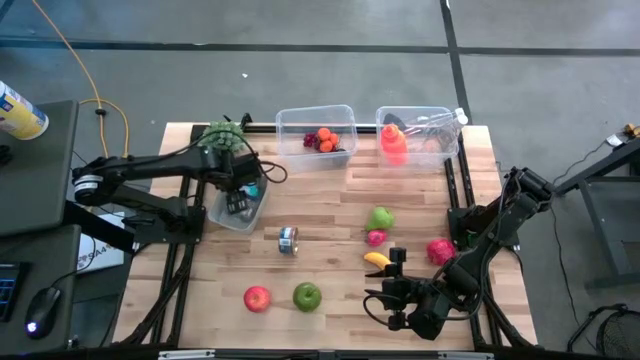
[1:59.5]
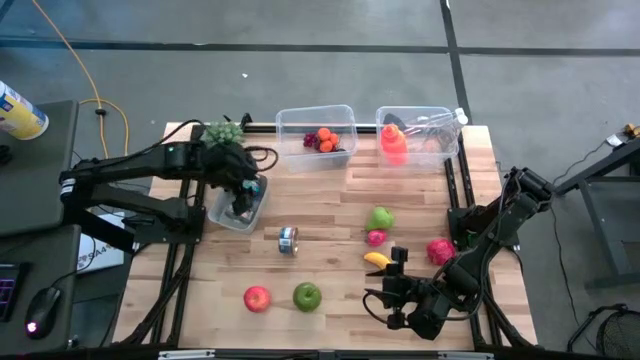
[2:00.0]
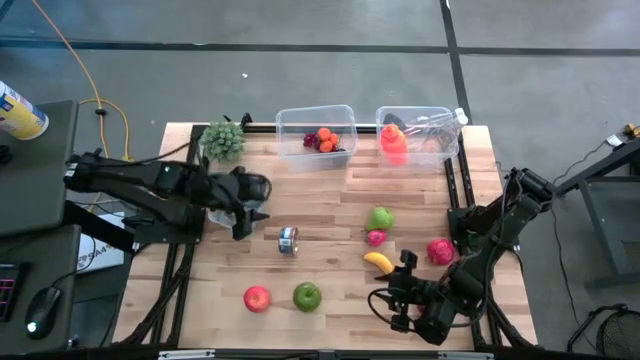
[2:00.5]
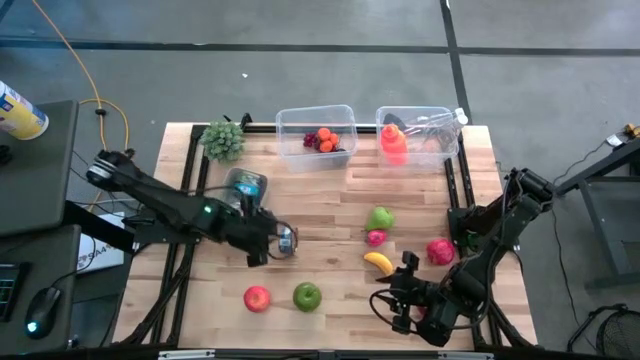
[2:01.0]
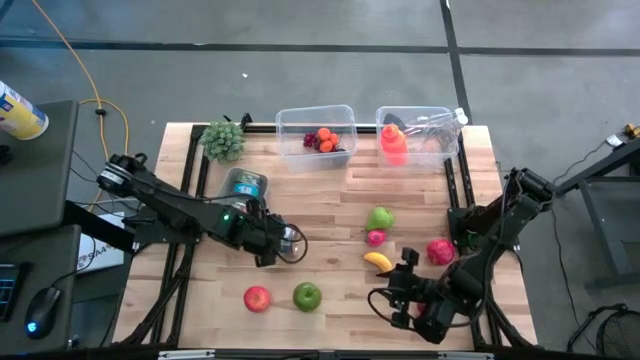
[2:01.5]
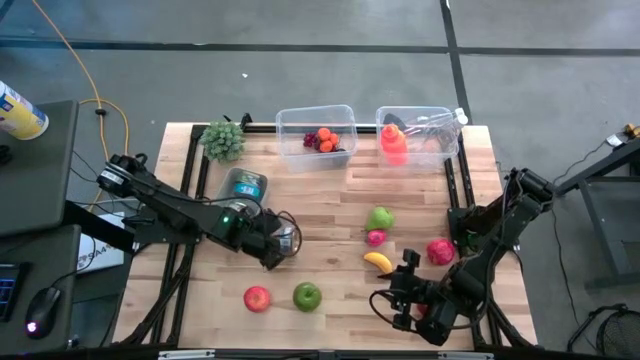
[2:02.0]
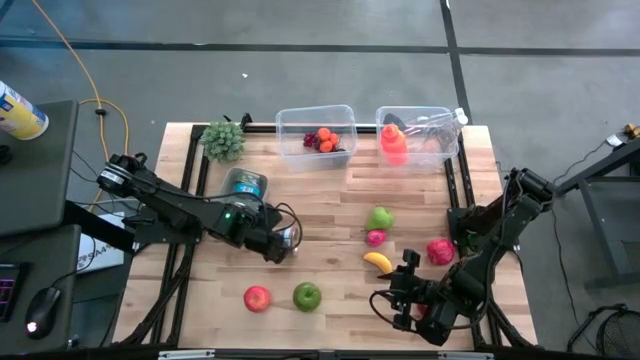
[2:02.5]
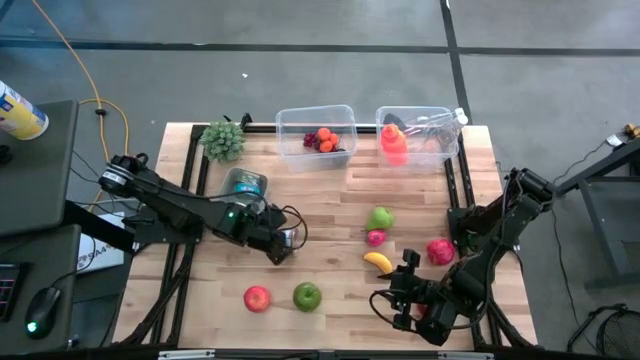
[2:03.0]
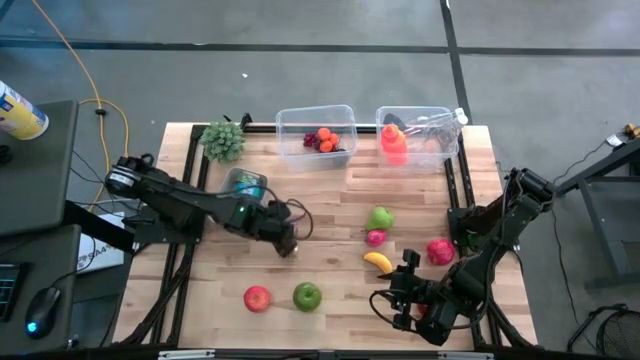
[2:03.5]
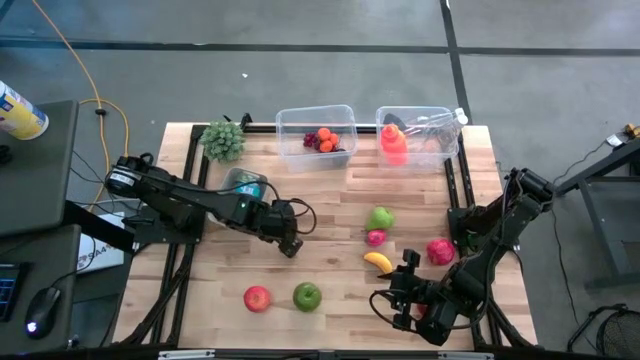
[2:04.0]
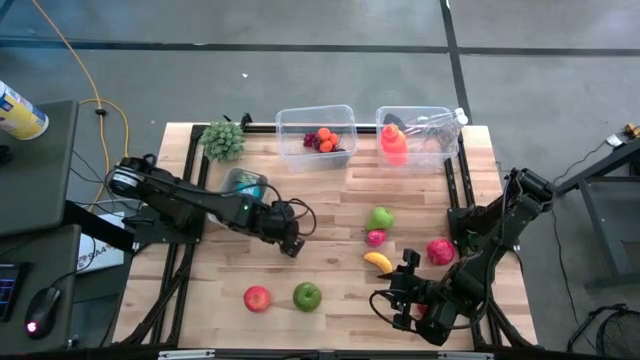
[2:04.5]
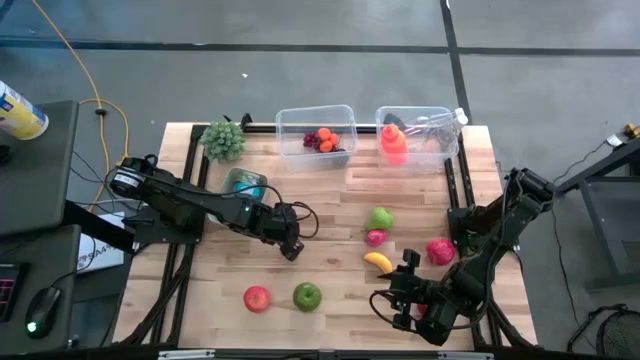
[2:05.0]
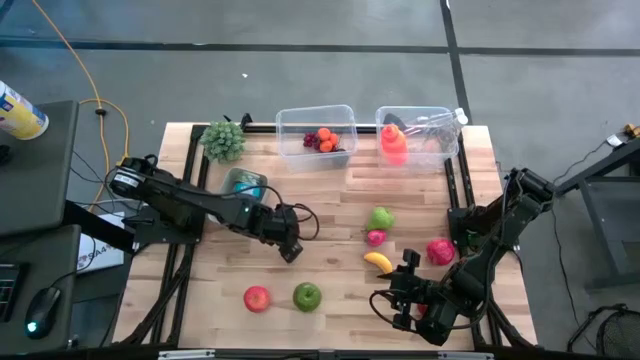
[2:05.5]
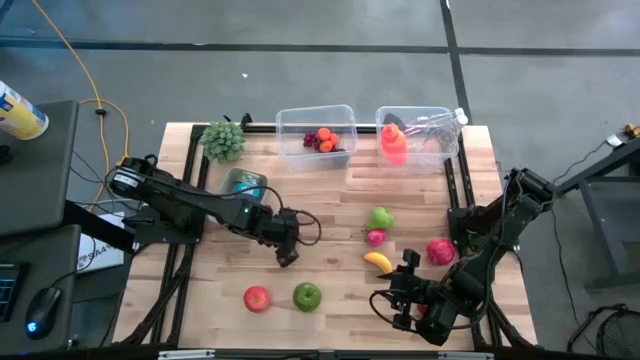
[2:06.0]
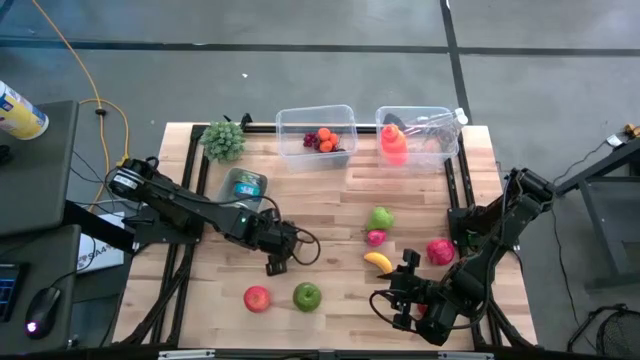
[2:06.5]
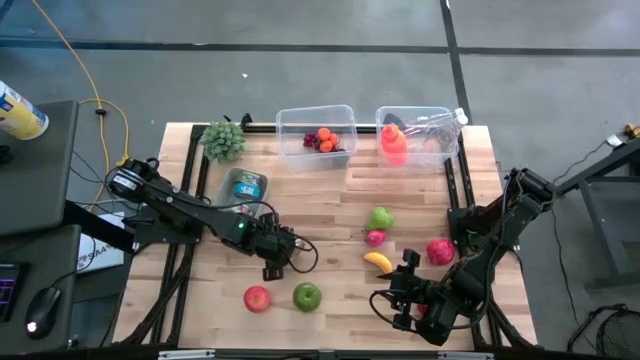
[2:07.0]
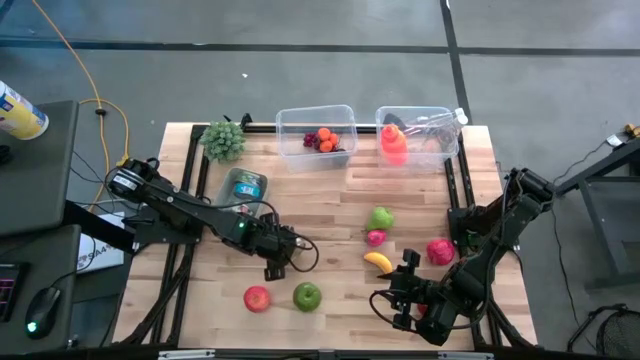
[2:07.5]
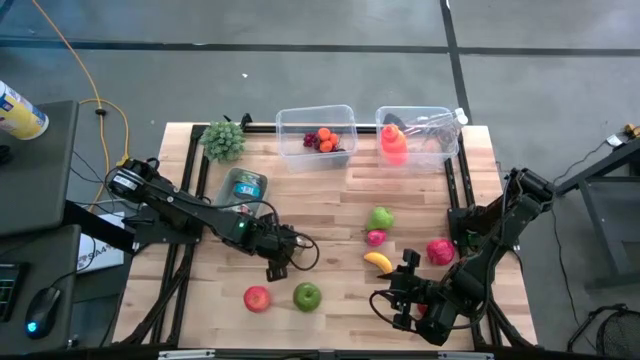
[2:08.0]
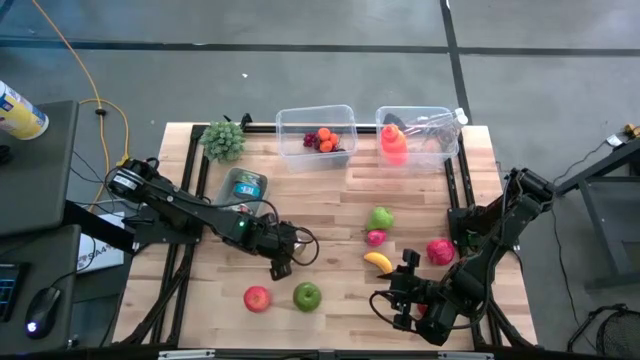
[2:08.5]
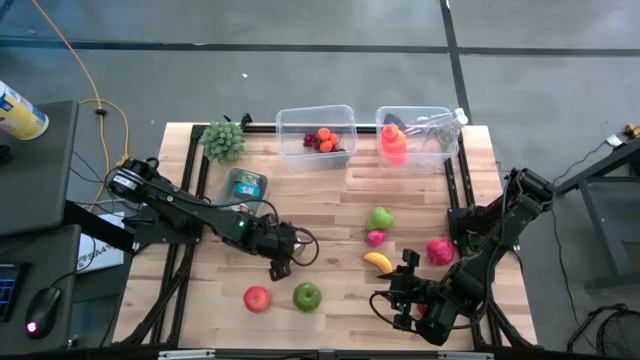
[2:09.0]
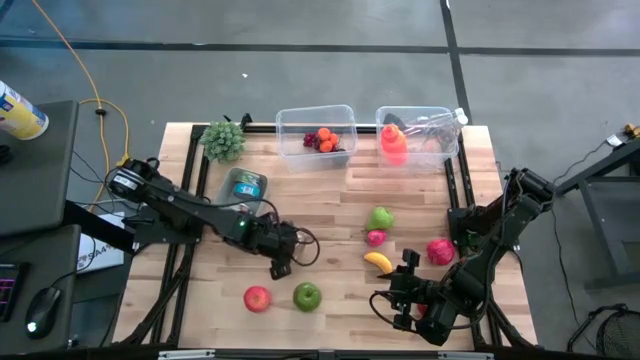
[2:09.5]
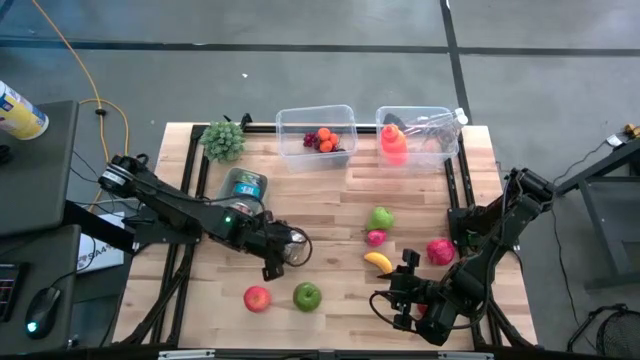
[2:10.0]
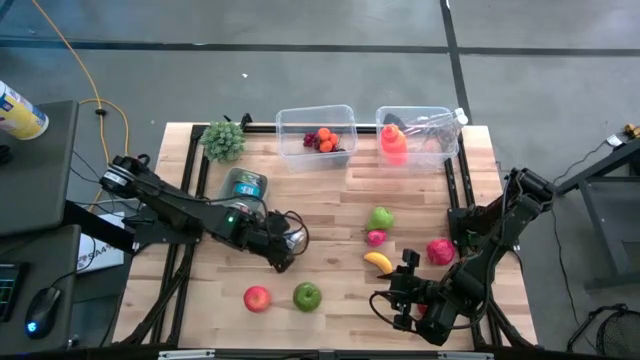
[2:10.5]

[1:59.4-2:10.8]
Task: Pick & Place Food Item
Put the blue pink tuna can into the grey bin

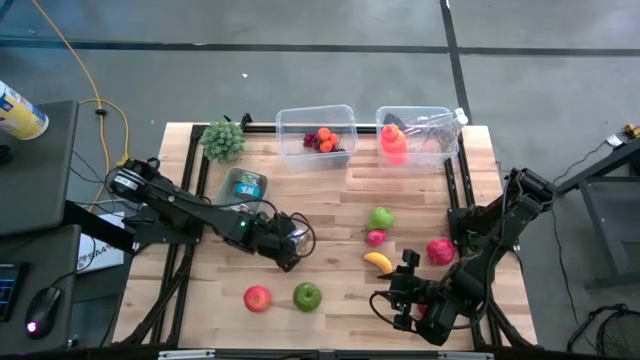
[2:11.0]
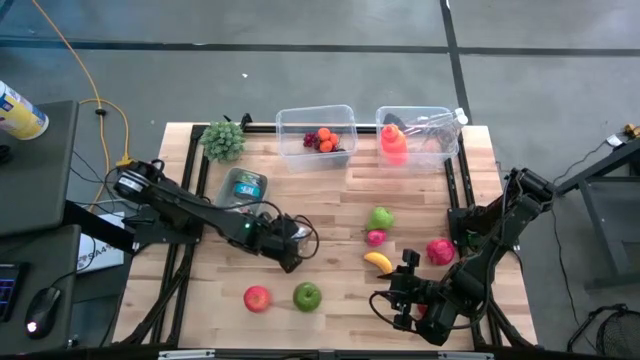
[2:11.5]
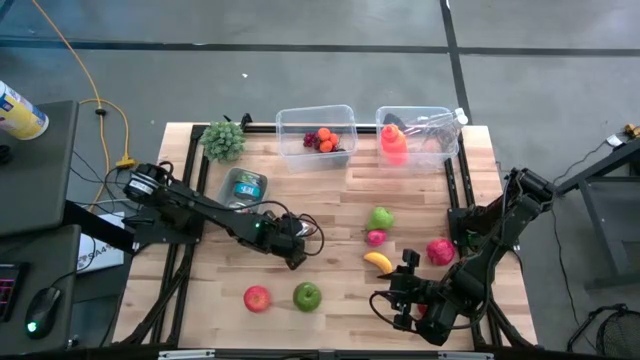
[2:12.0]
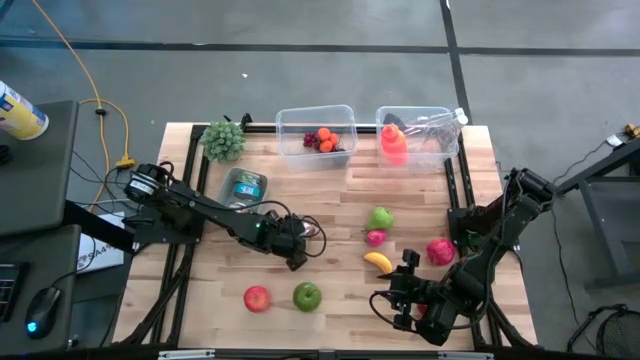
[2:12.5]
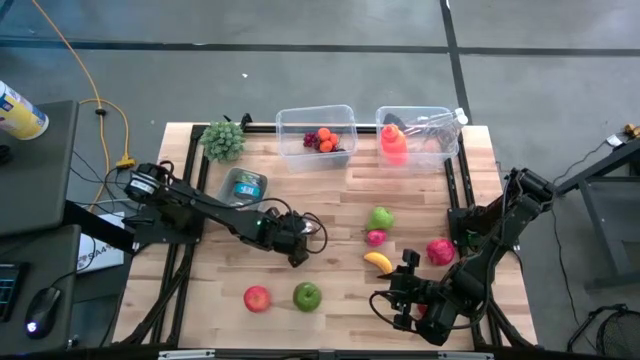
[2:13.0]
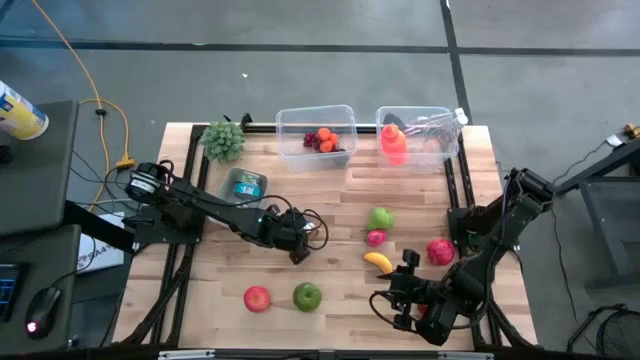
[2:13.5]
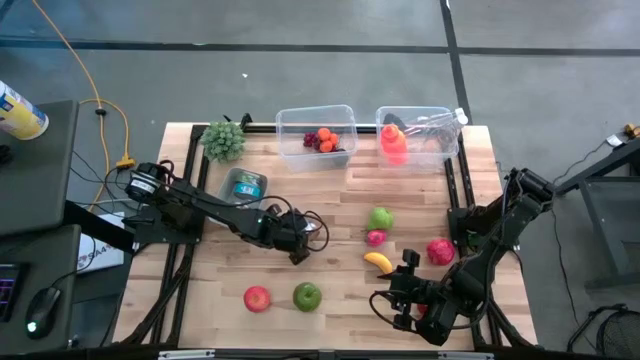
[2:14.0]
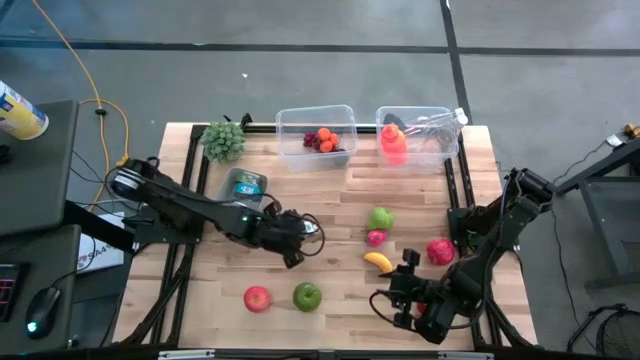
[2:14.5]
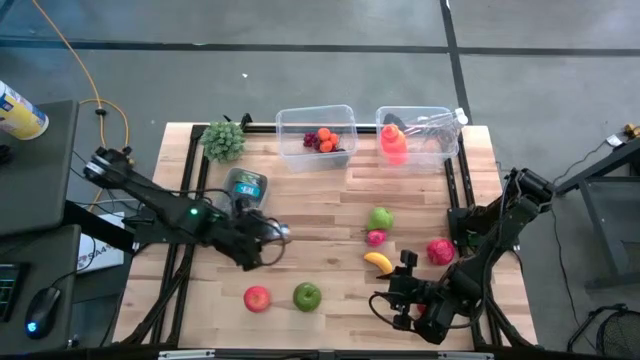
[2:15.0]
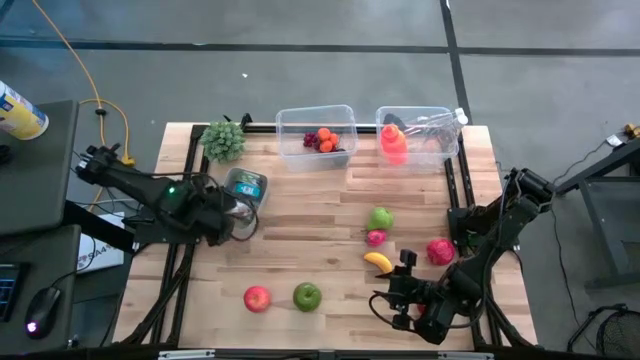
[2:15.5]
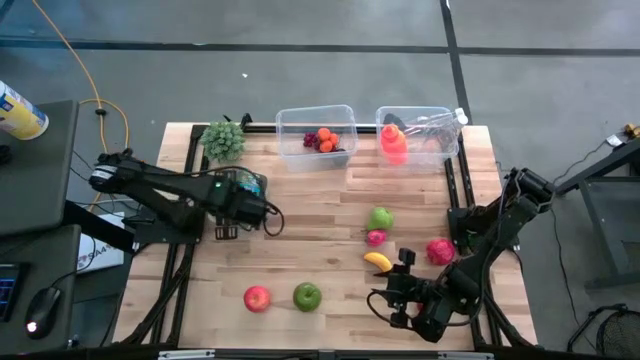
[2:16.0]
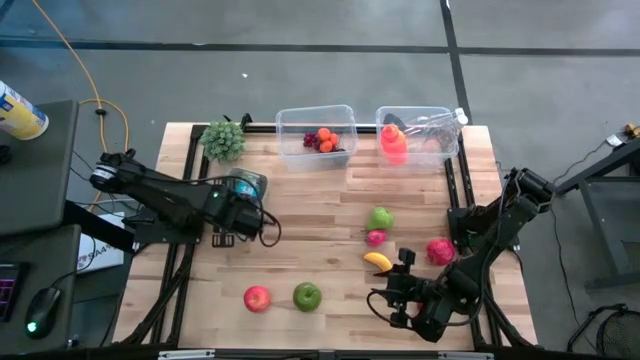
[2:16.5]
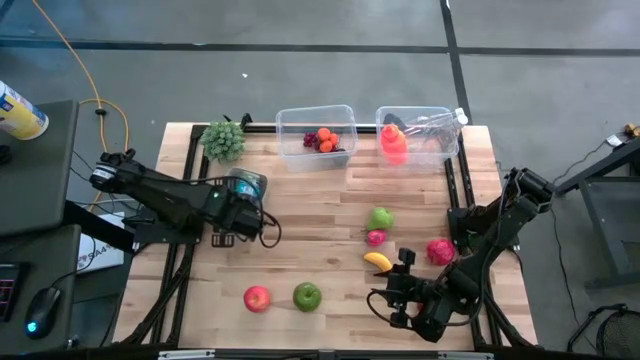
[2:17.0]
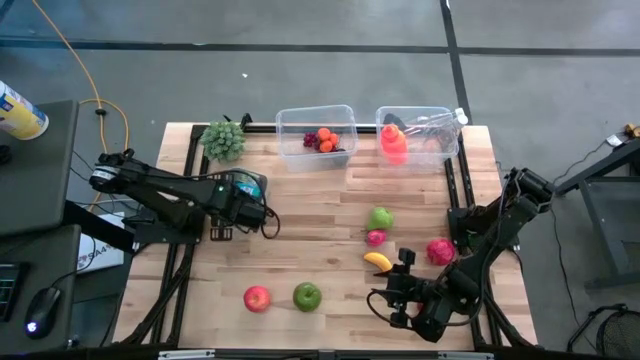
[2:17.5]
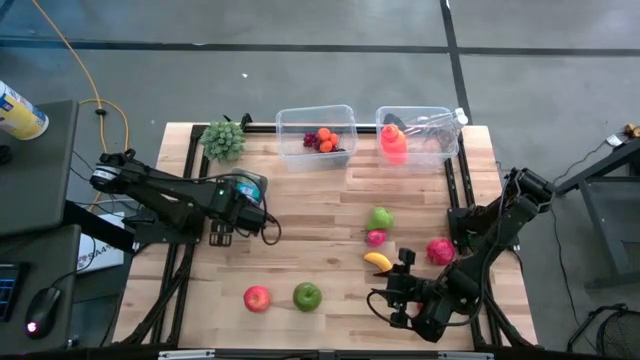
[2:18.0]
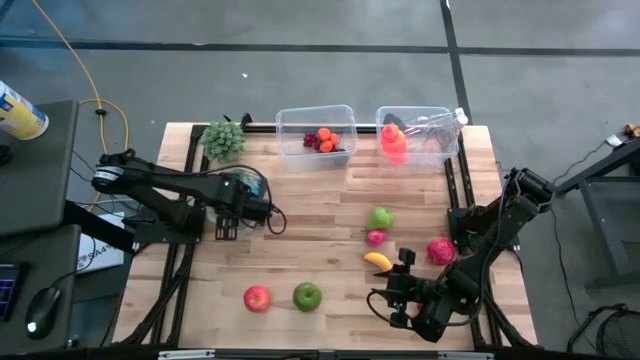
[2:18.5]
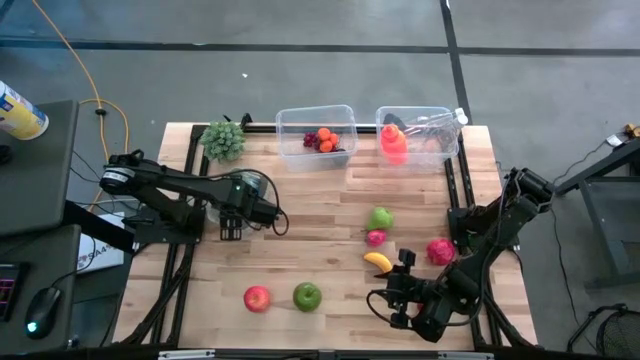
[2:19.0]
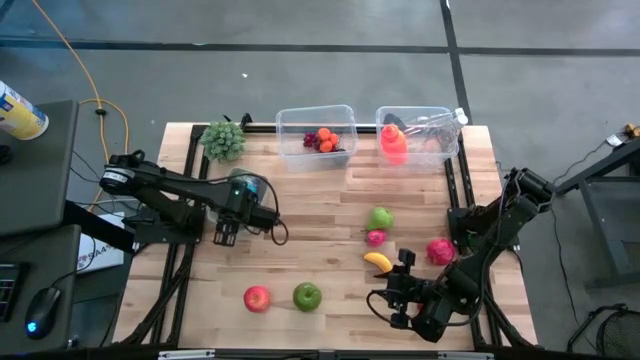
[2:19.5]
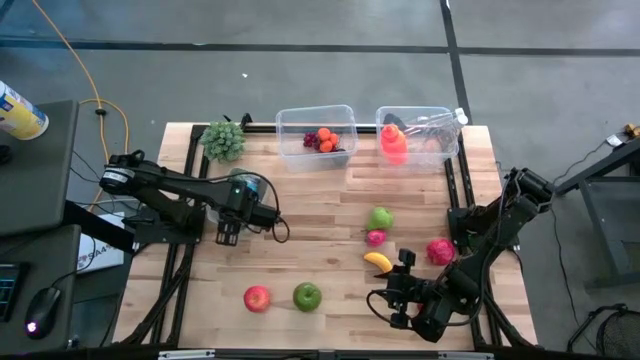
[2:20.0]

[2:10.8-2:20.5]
Put the blue pink tuna can into the grey bin

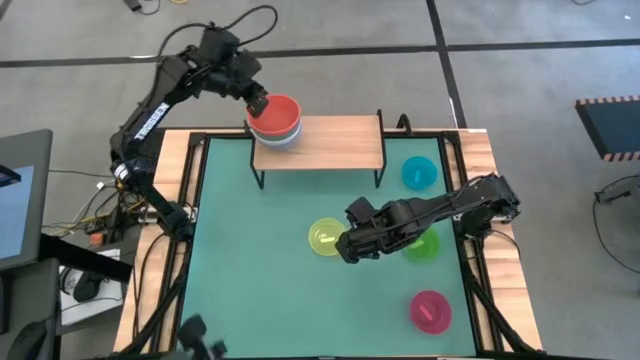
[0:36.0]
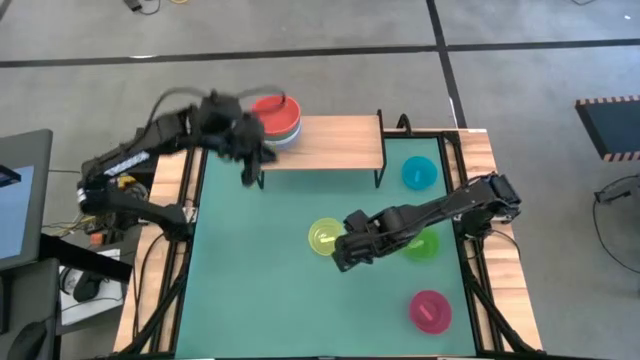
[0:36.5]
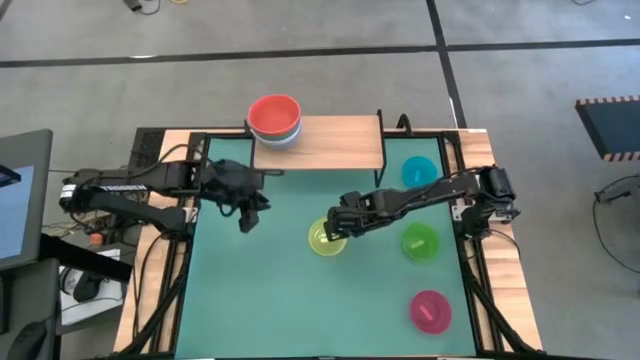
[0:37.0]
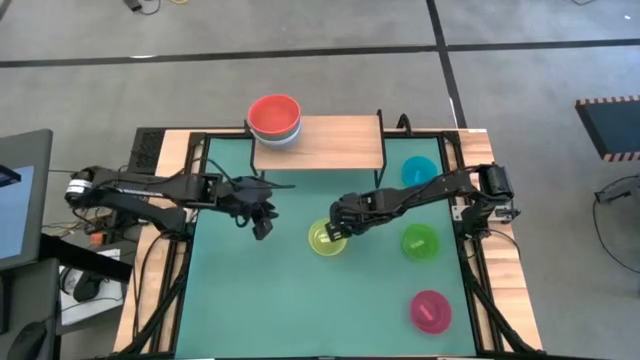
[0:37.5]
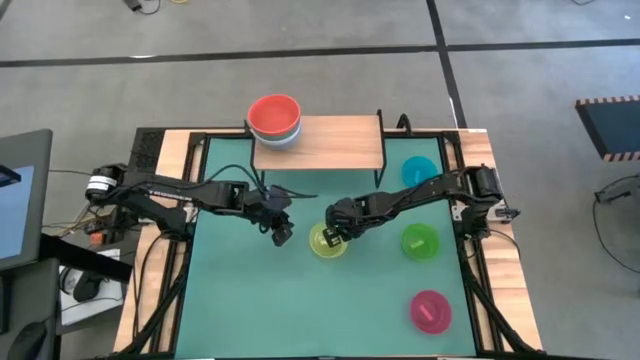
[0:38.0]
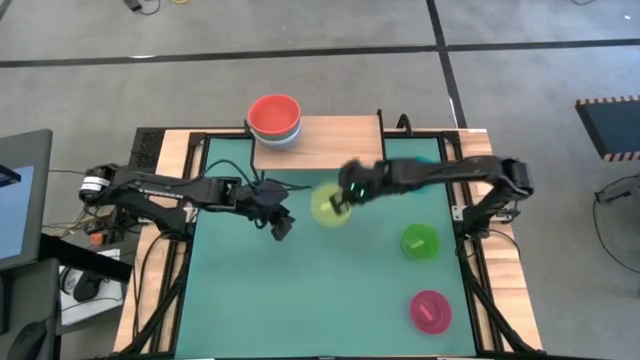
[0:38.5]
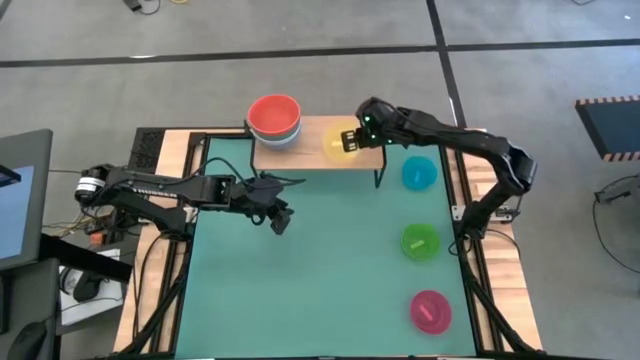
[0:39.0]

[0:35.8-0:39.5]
Task: Place and stack bowls onto a shelf
Put the light yellow bowl on the shelf
